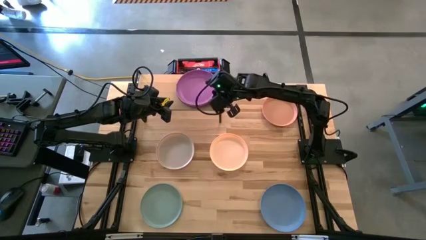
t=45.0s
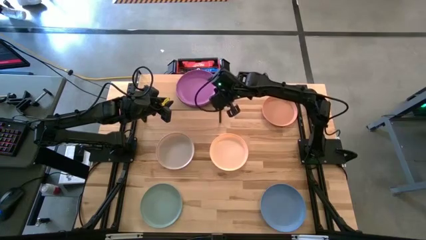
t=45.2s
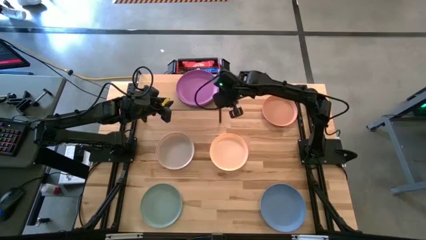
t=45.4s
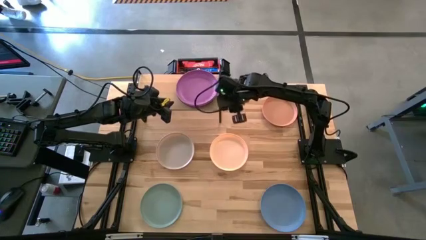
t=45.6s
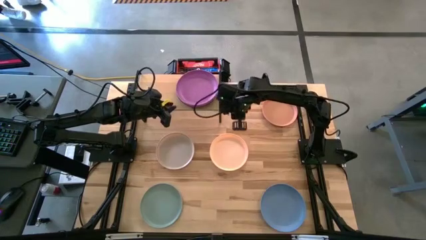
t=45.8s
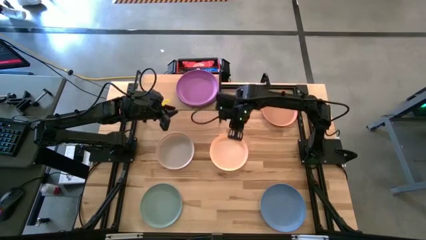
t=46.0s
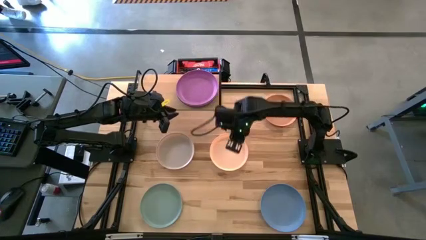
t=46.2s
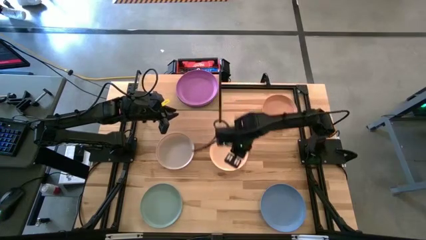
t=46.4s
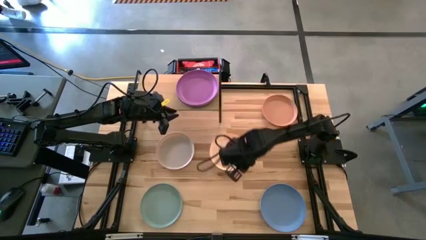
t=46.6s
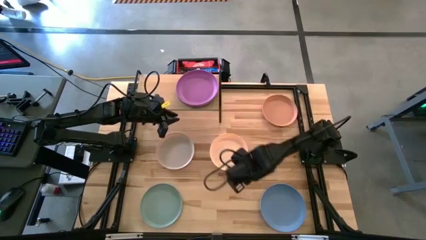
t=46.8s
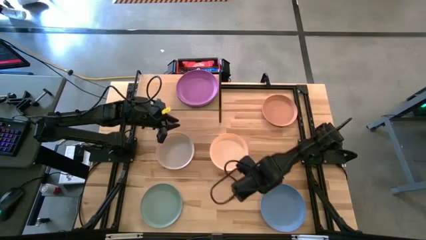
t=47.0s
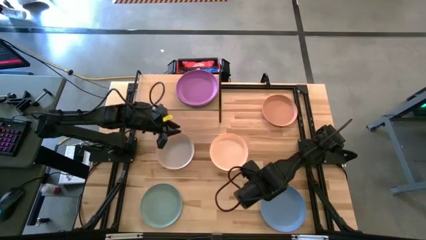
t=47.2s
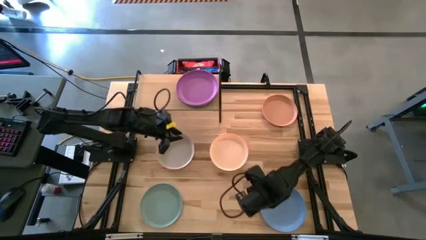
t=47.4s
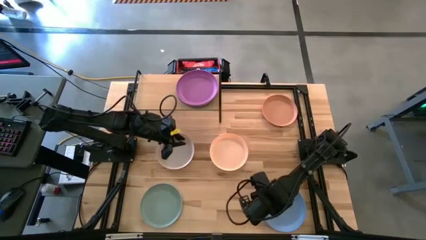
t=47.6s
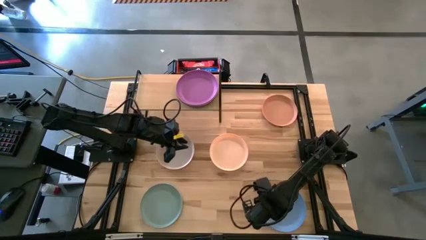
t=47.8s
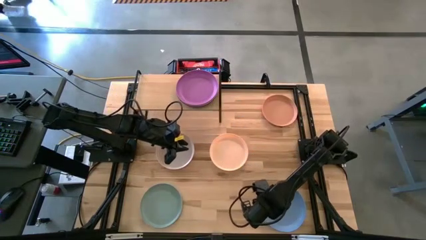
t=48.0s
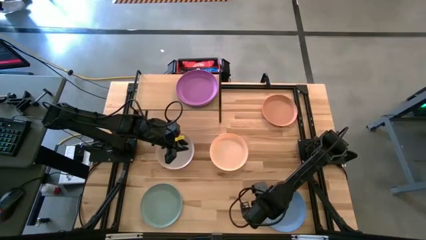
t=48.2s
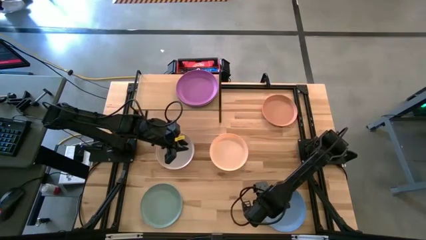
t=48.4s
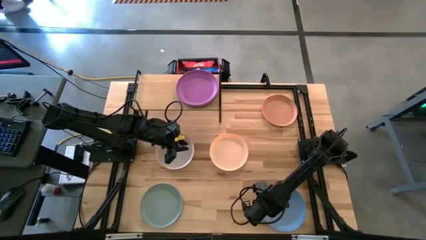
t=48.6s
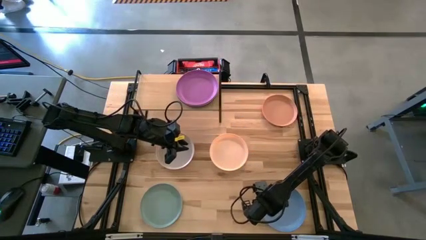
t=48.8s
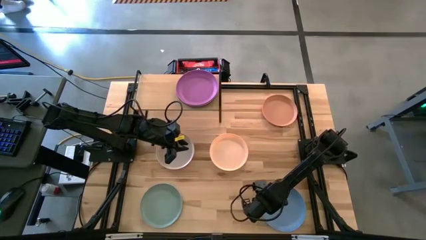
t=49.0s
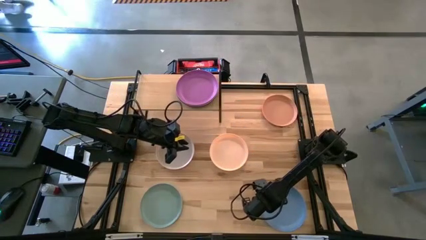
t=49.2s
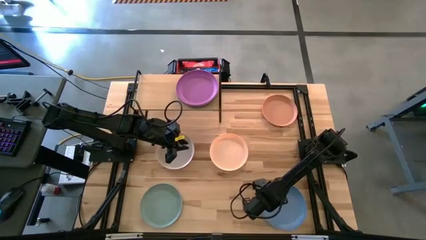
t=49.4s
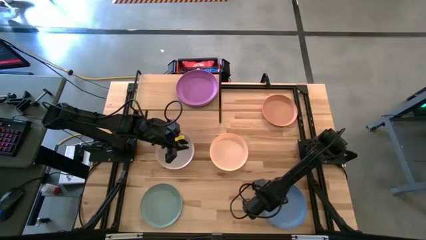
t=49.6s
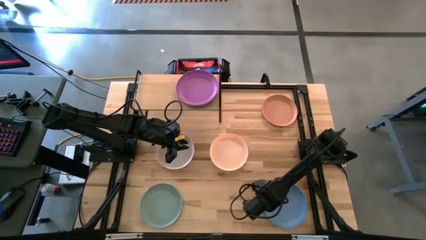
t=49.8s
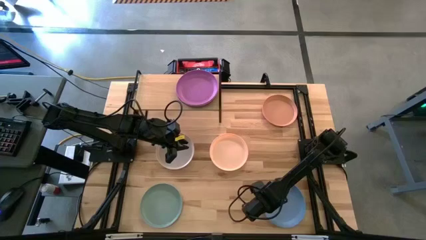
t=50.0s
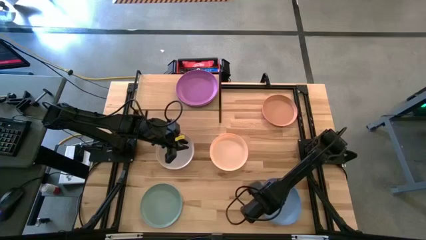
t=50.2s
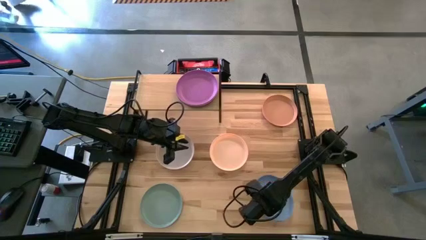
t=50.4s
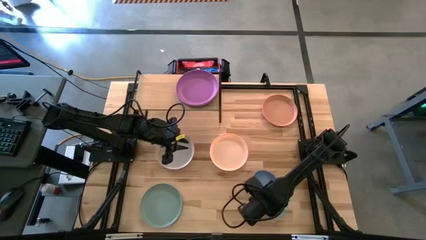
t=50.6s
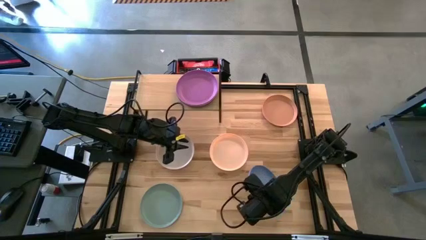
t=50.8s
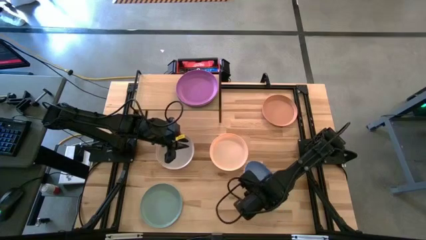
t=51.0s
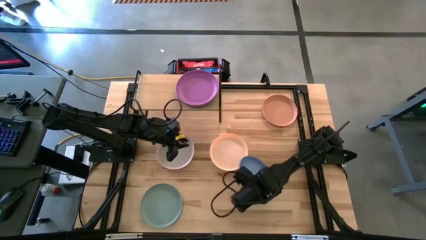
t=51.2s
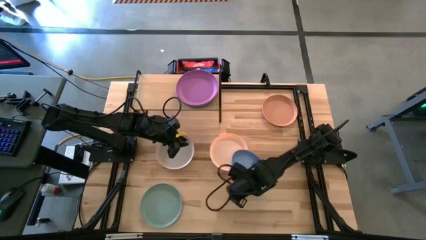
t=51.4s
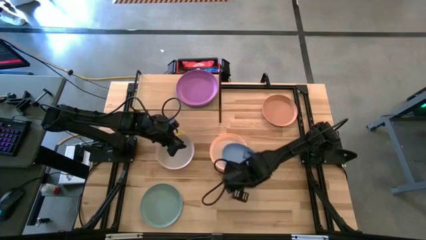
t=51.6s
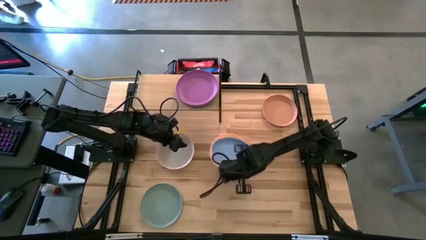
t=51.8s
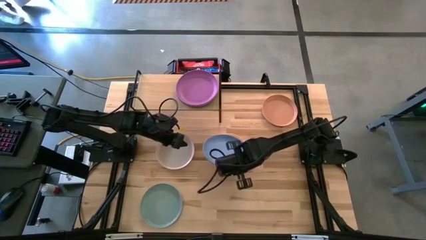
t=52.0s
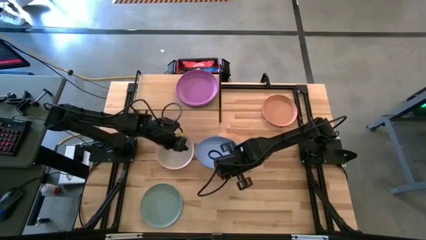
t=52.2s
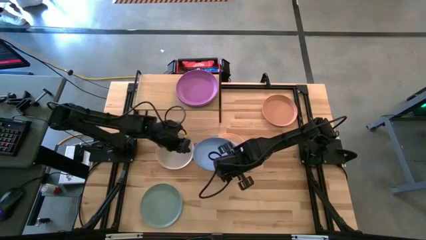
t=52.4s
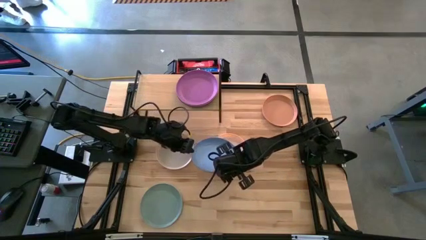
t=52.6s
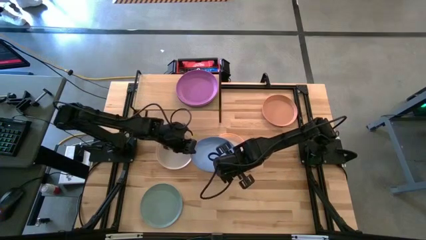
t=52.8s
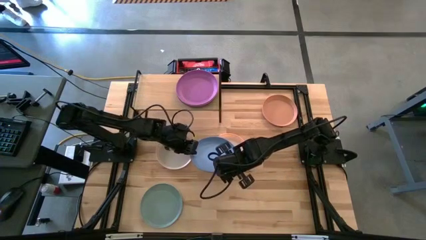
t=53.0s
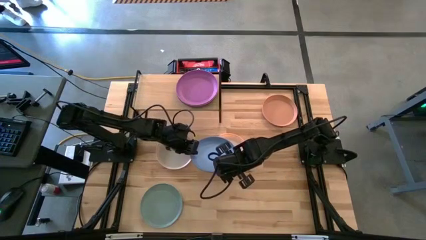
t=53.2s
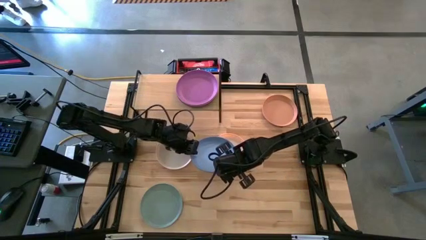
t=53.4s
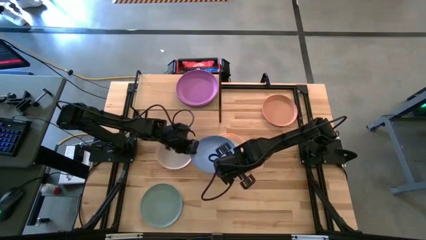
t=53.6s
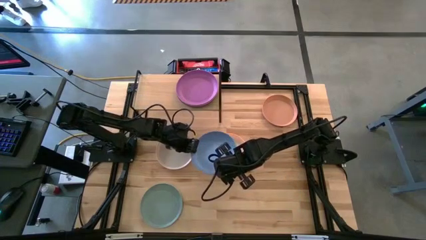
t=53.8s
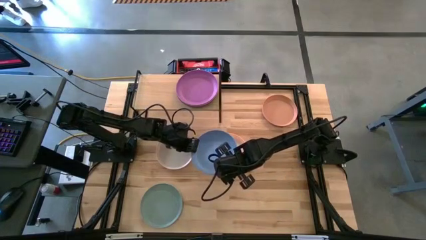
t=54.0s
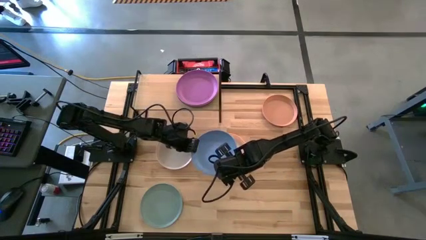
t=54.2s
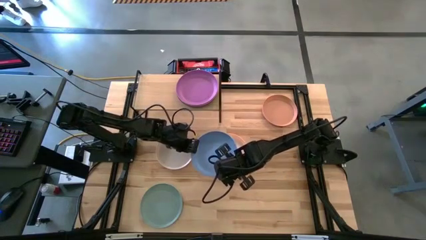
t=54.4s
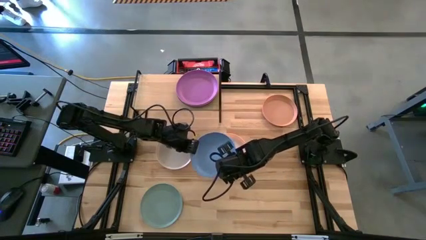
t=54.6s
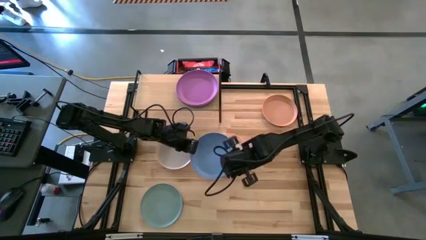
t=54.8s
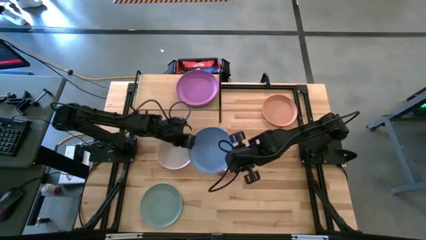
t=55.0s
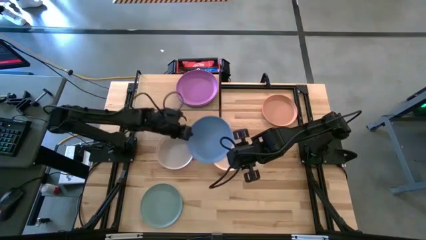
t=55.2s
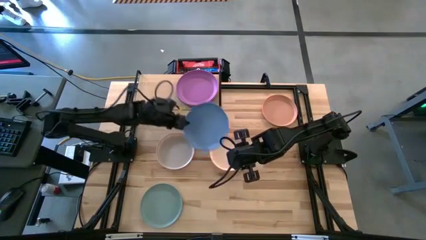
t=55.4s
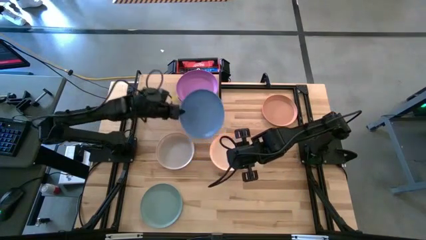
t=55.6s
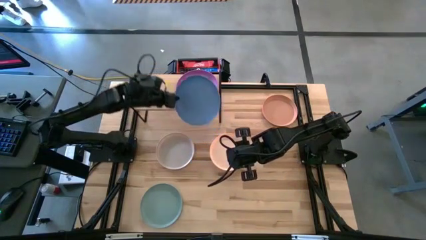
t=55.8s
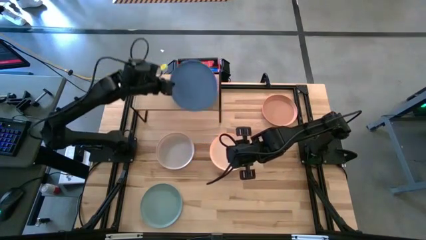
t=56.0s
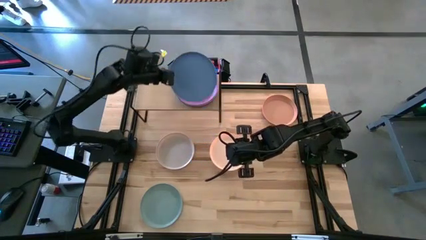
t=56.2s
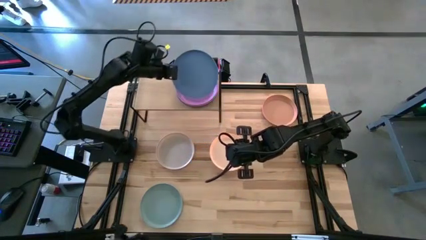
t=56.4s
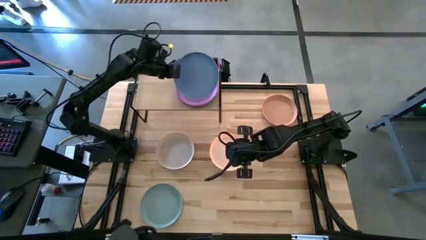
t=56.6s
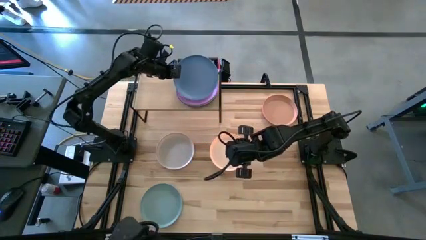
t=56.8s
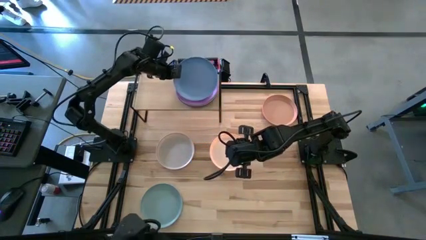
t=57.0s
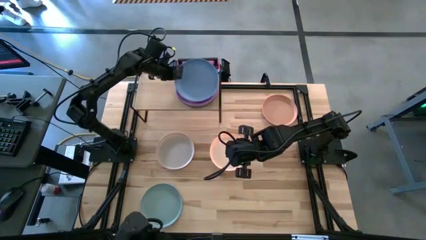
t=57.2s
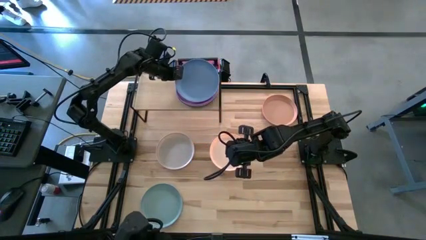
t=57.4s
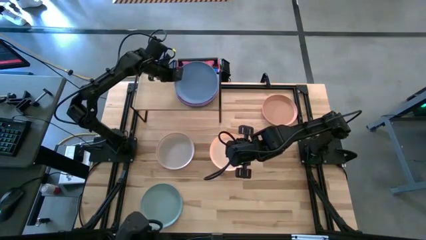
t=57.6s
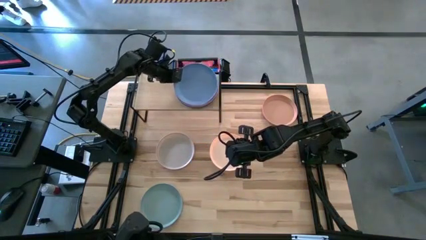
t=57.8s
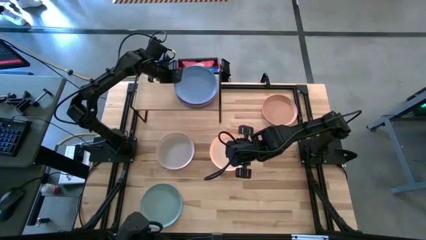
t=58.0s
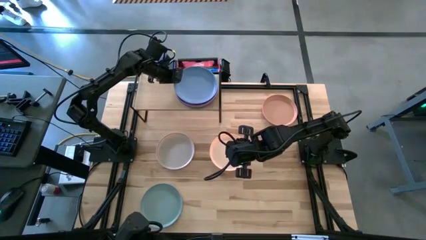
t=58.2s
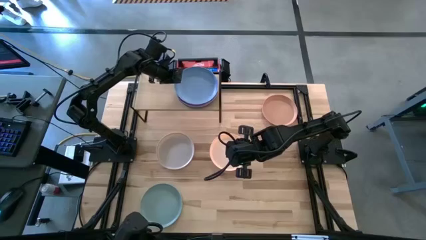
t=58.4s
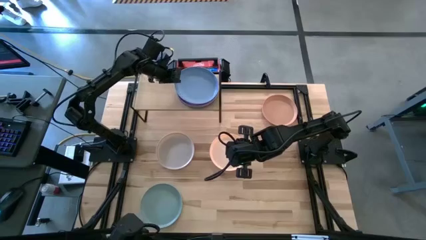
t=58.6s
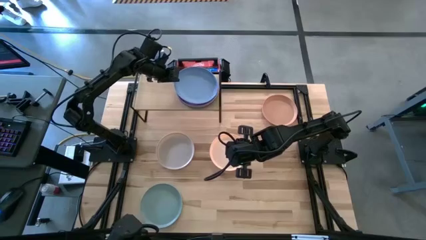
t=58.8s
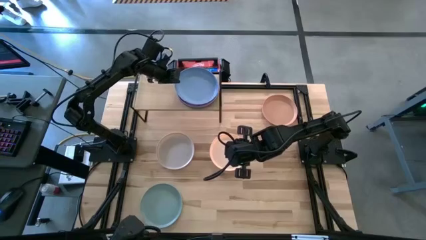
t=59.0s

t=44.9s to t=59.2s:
Task: Place and stack plates onto a shelf
Stack the blue plate on top the purple plate on the shelf

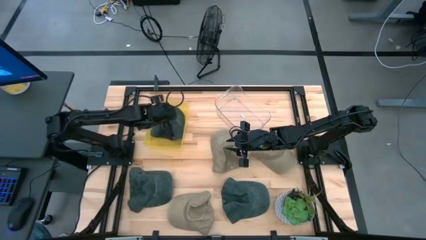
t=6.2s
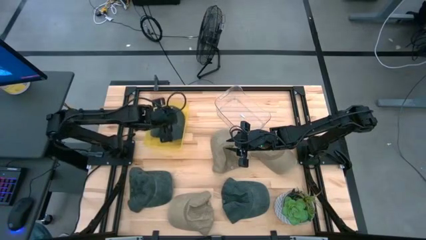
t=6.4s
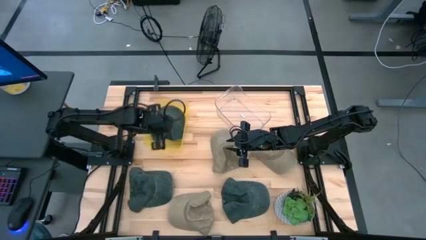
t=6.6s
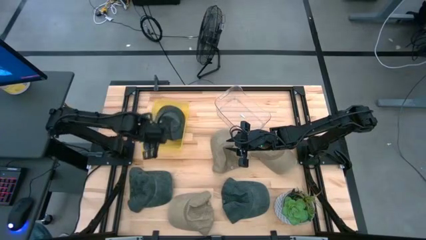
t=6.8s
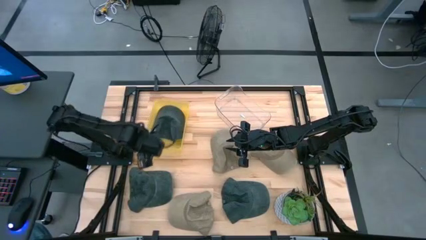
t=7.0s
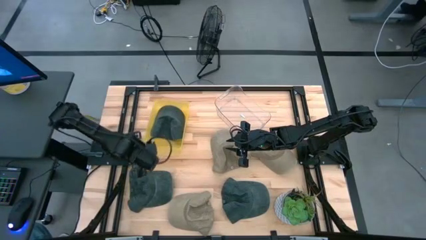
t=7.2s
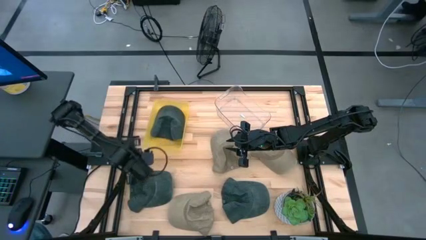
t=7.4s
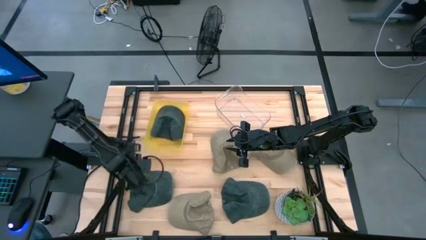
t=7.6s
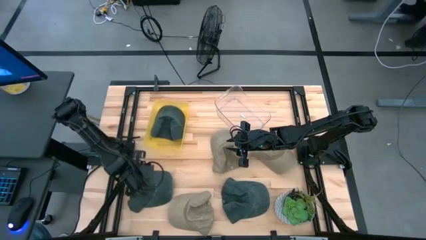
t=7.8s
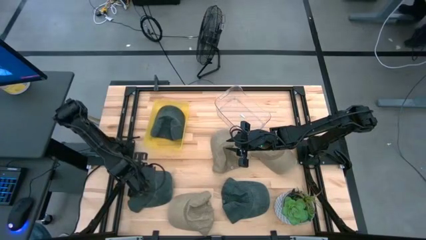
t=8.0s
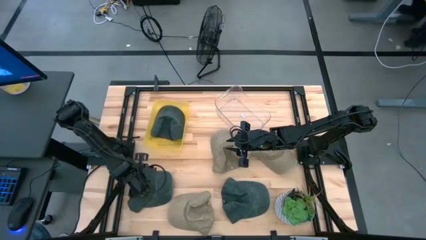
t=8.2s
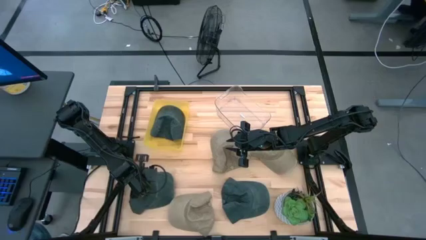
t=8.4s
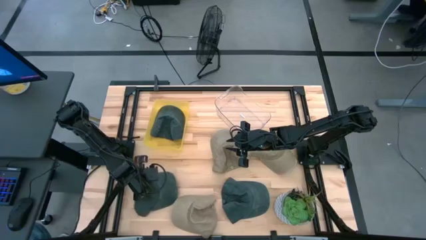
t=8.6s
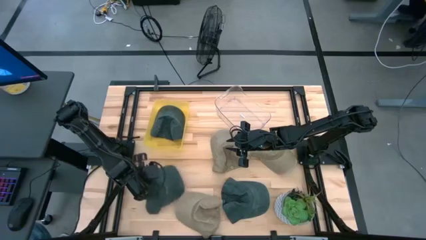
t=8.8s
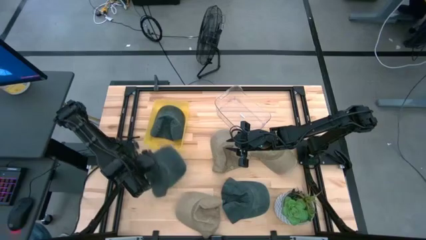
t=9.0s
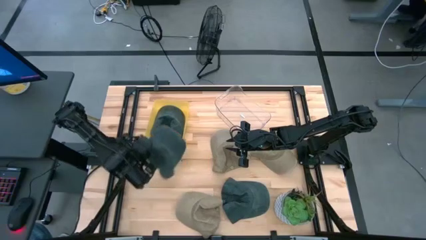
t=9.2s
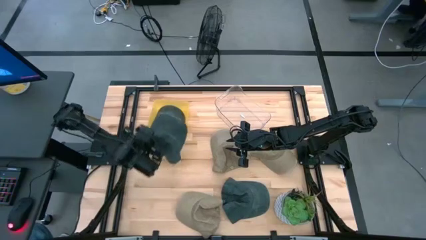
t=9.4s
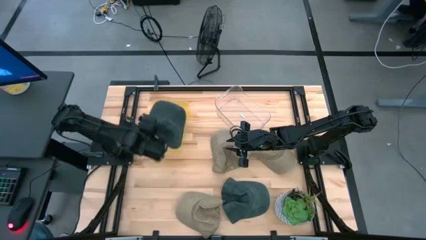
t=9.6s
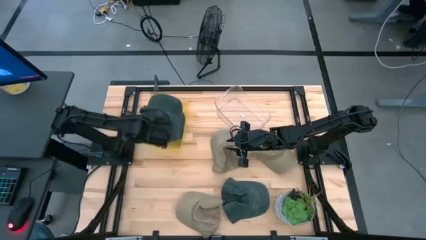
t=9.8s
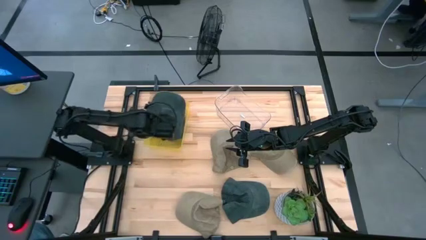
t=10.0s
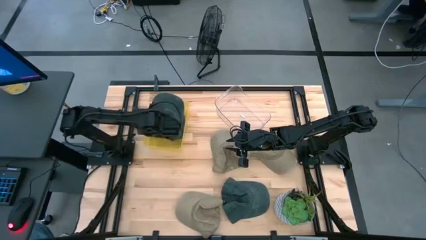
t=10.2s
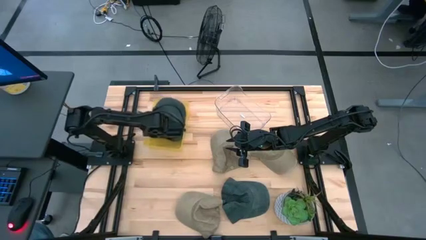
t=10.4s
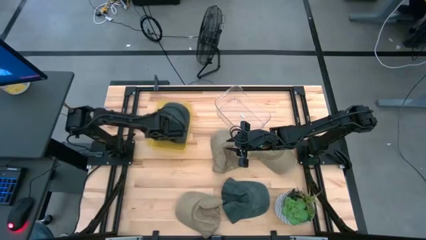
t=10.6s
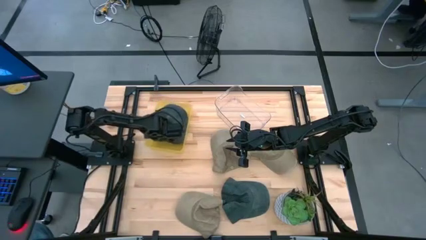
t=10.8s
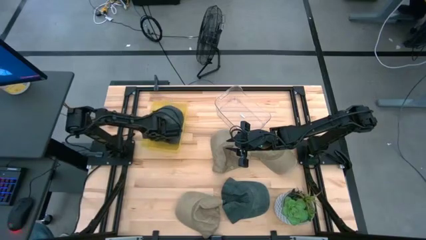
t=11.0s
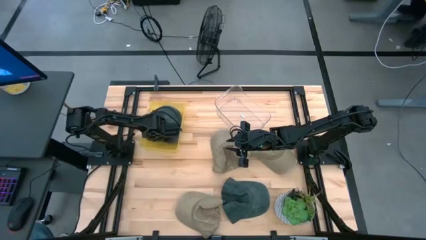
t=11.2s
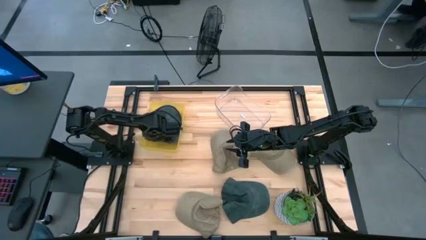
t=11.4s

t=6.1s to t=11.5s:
Task: Pick & Place hat
Put the left black cap into the yellow bin
